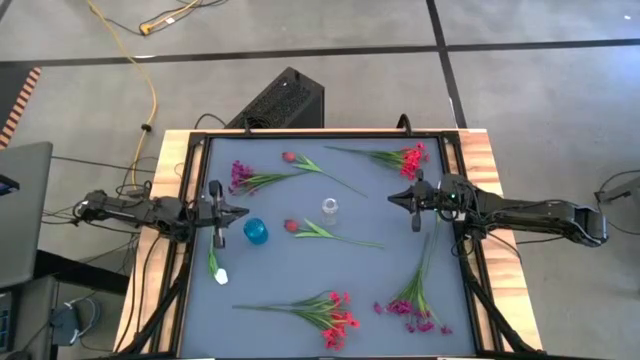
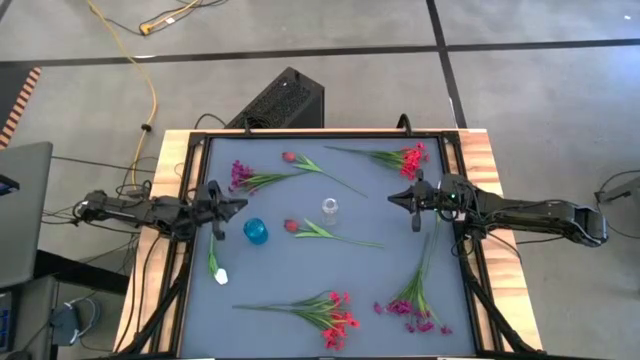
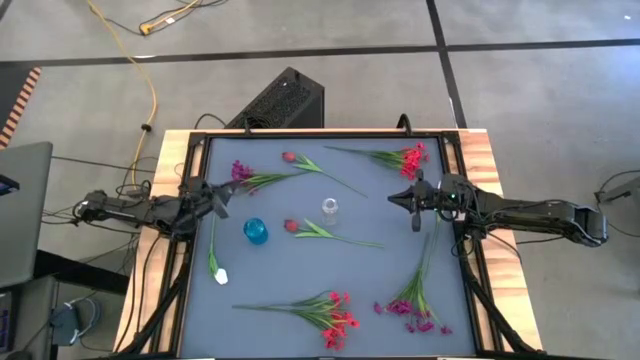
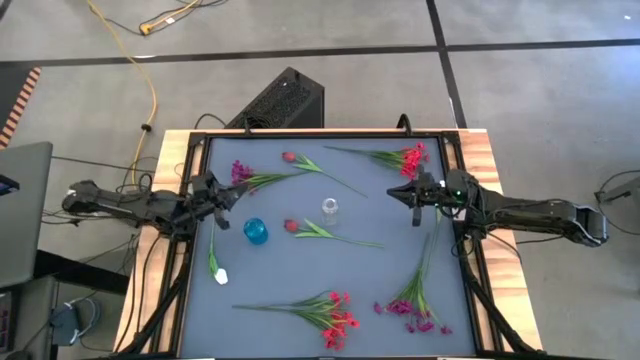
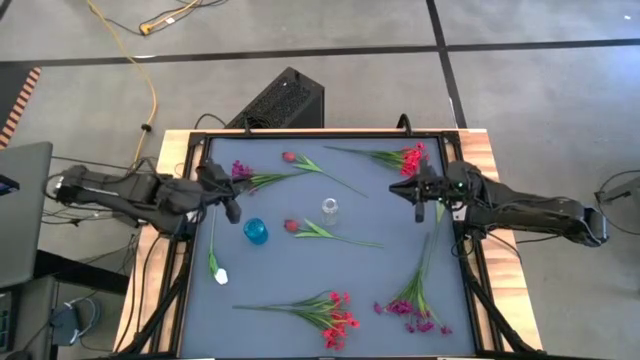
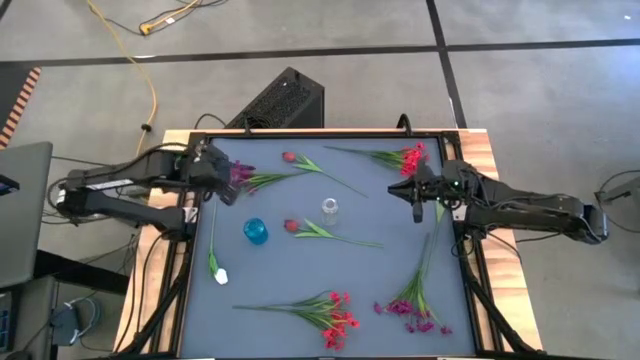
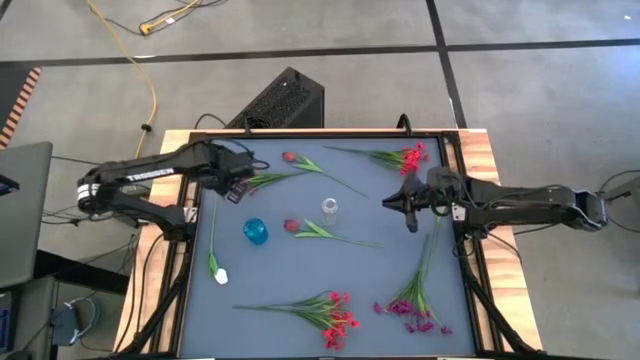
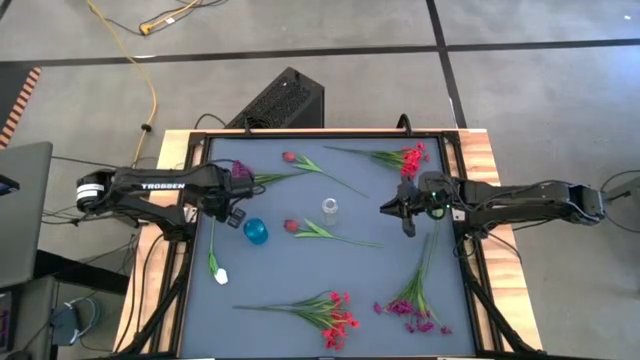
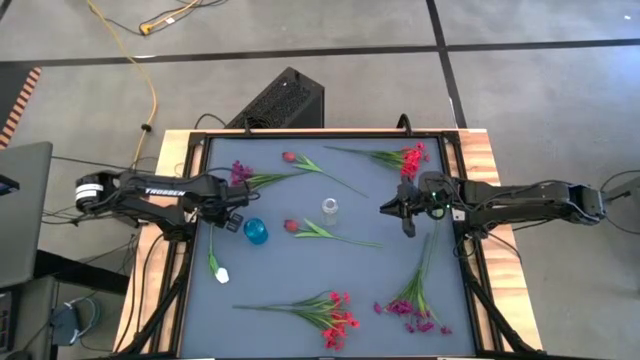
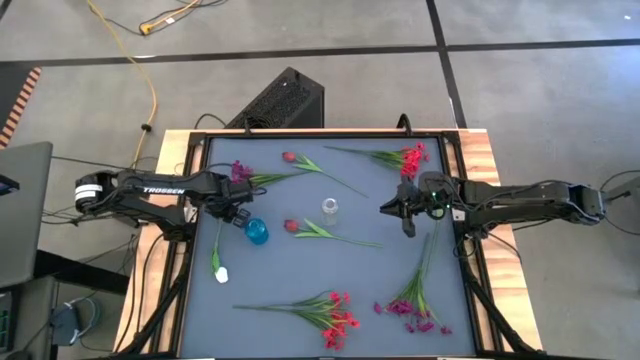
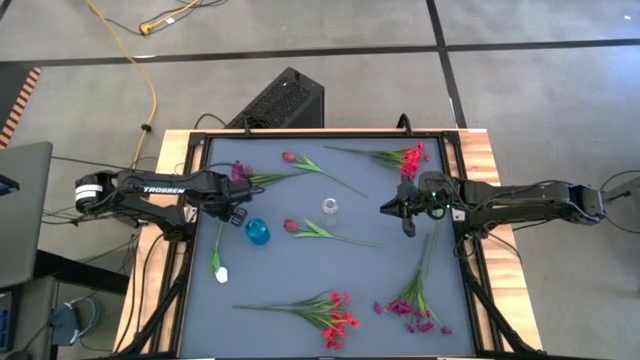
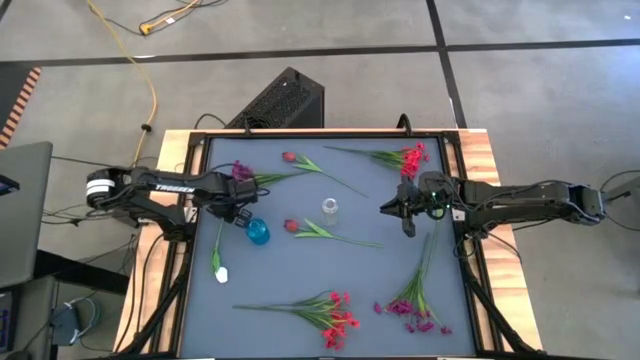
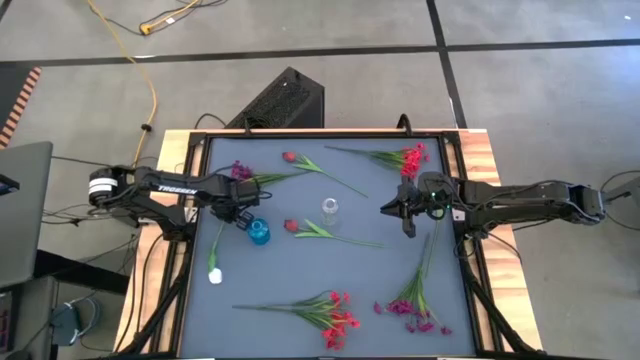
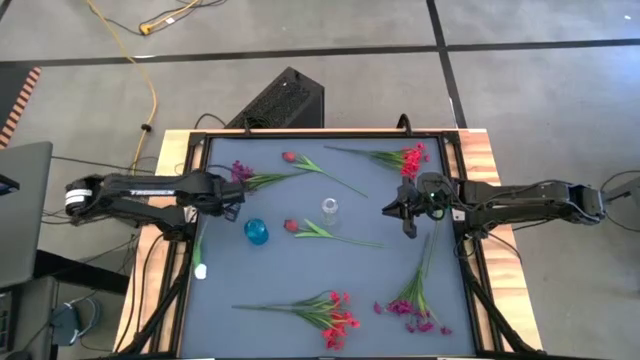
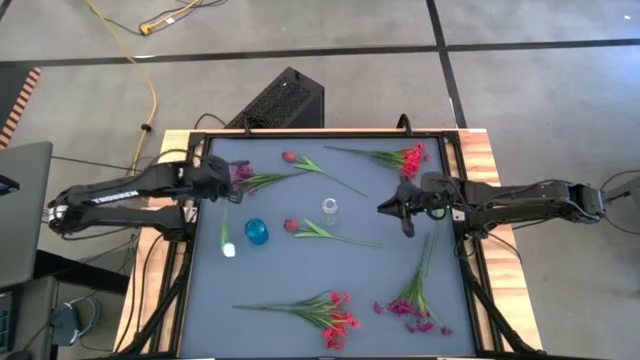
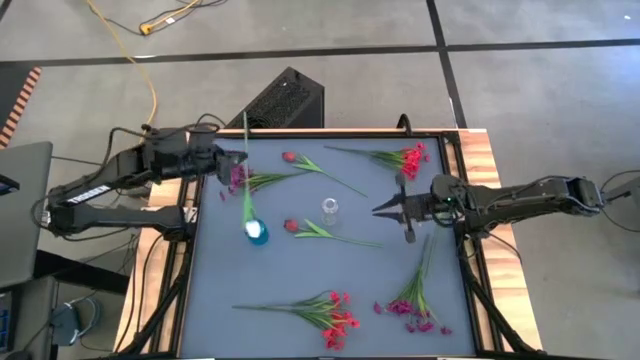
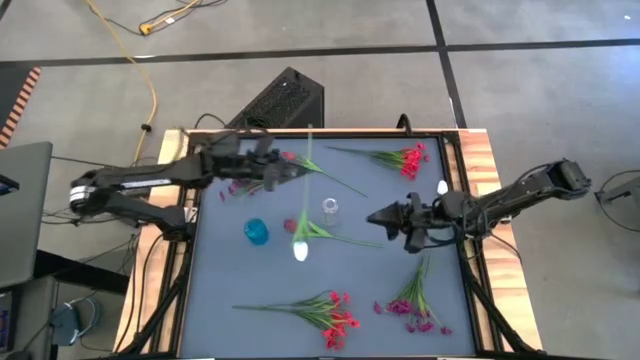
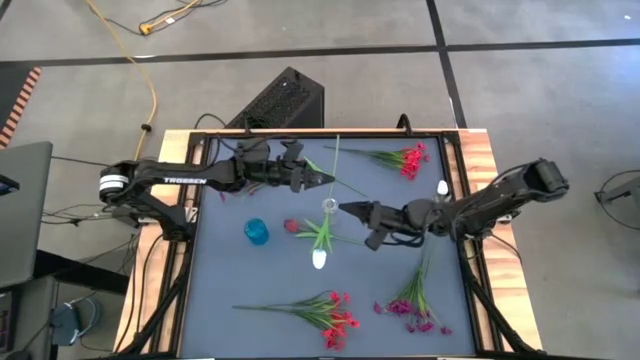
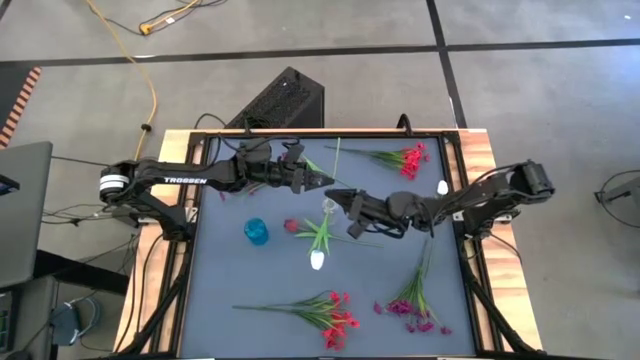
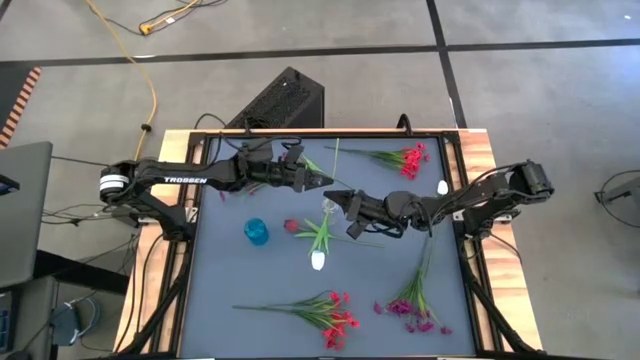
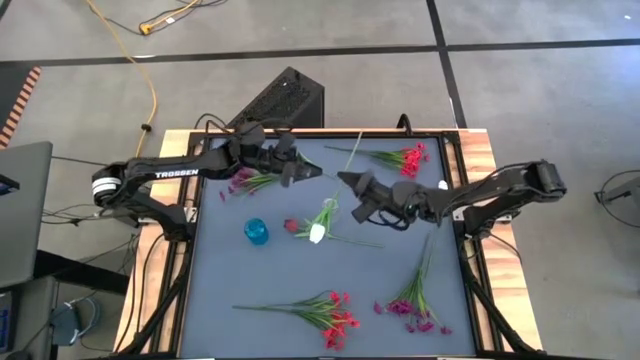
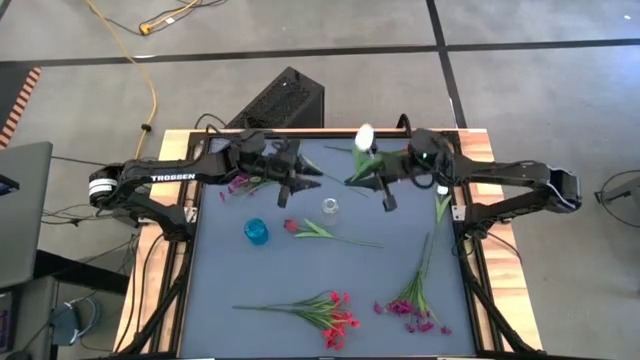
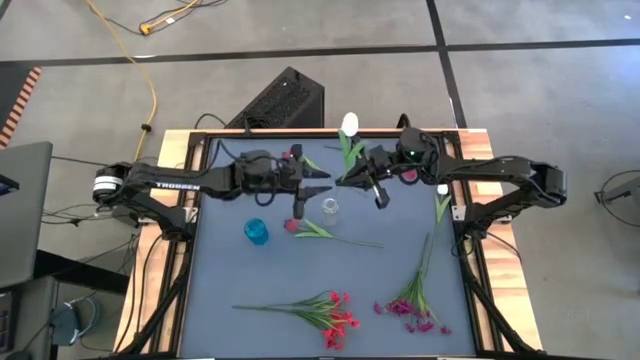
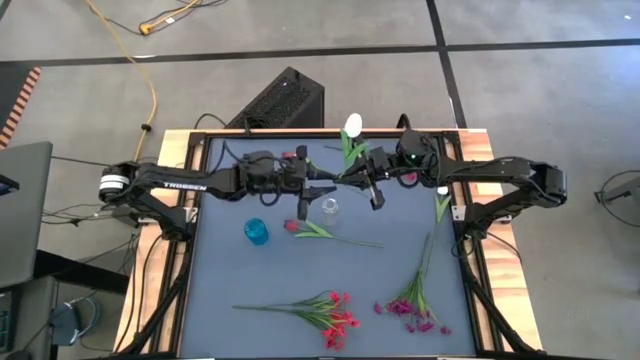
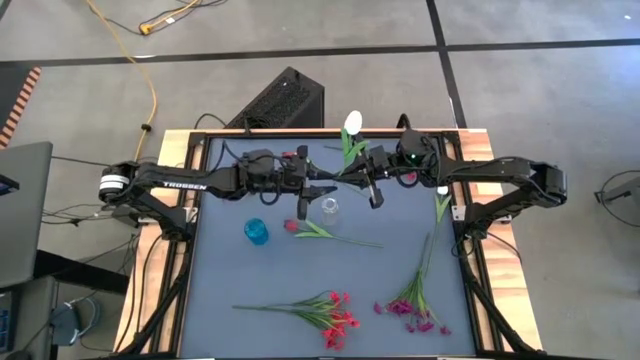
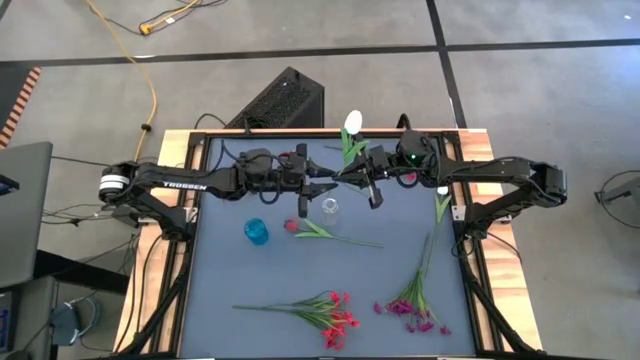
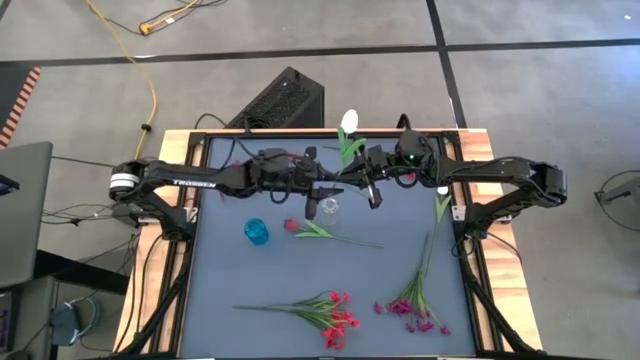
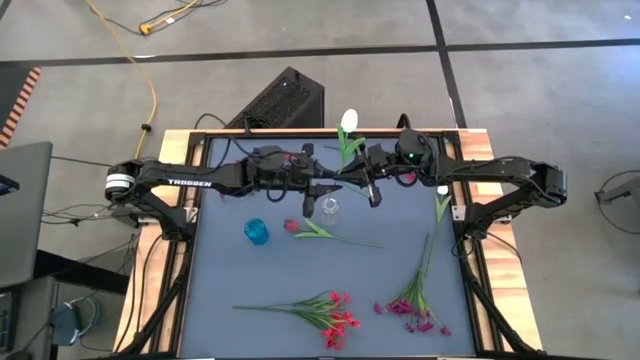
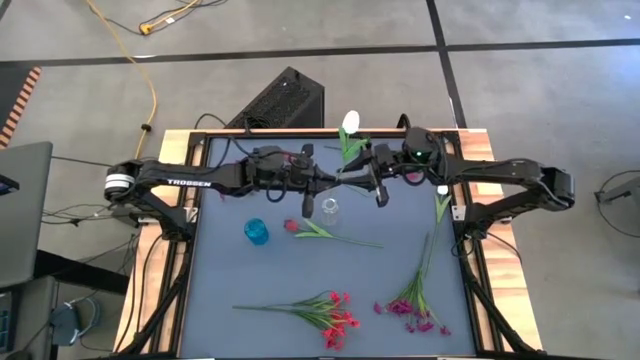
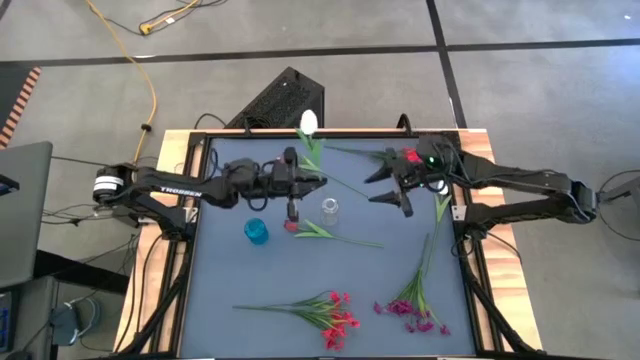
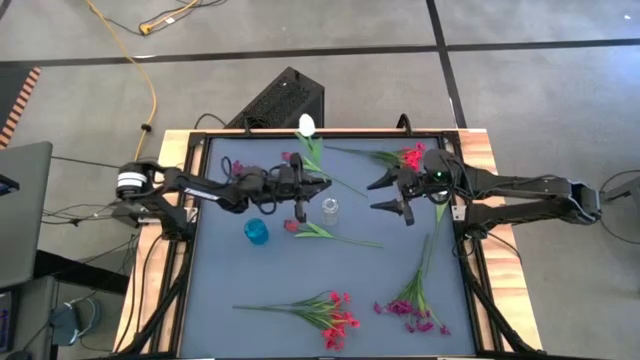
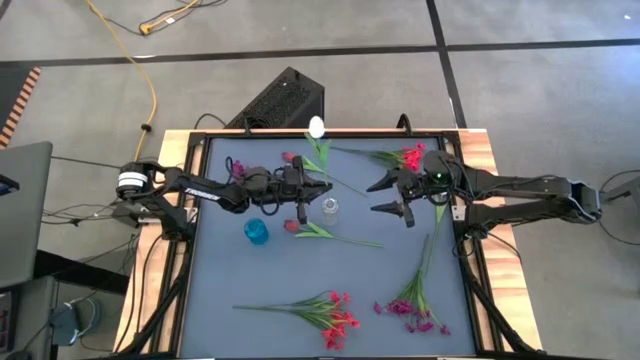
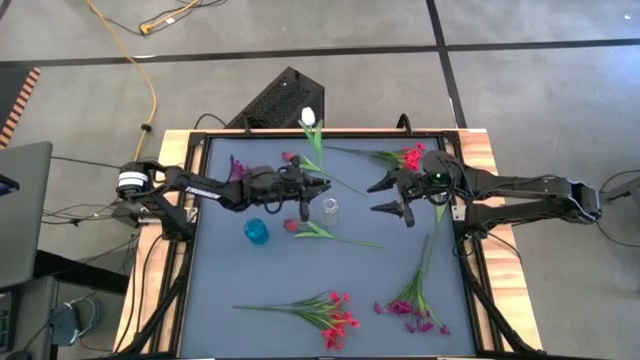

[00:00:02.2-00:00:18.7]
Task: Sort flowers into vase by color
Put the left white tulip into the transparent vase

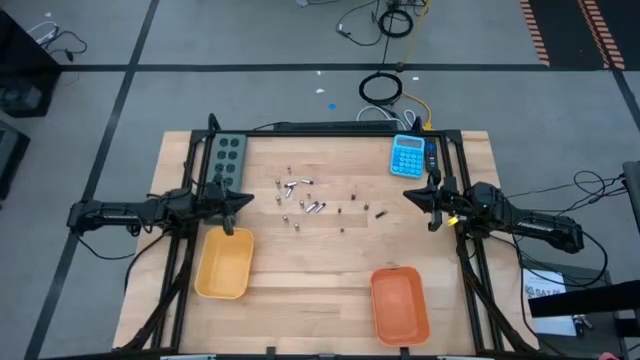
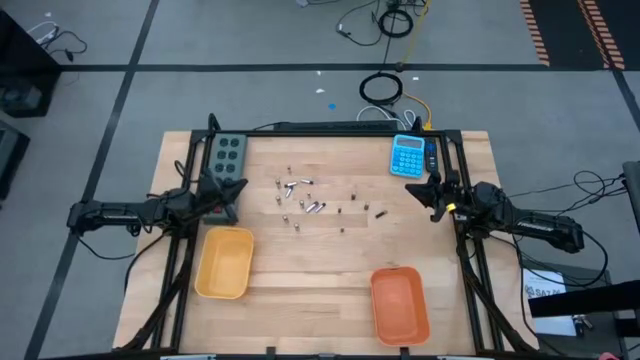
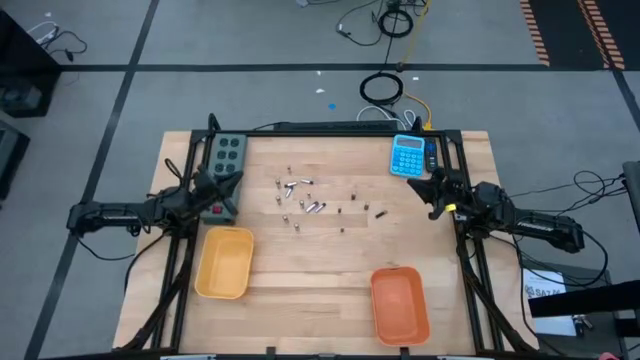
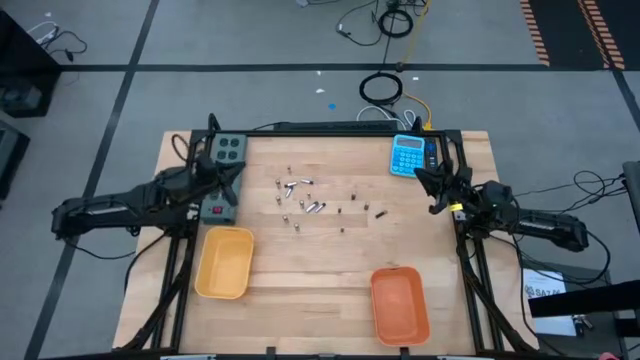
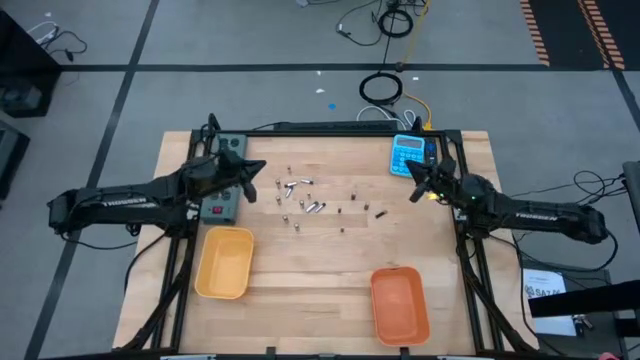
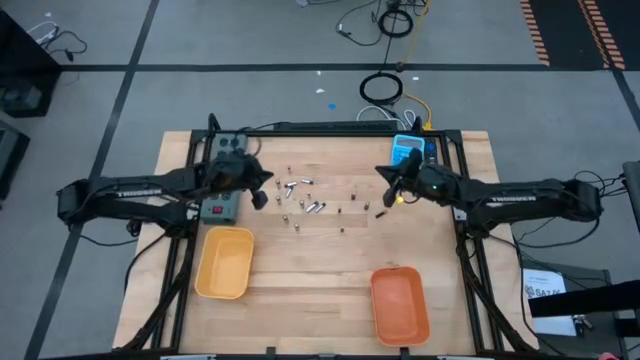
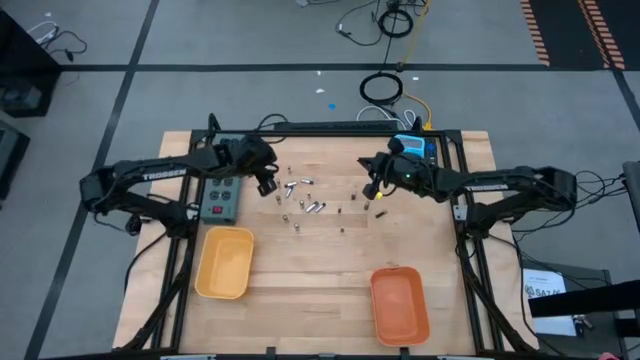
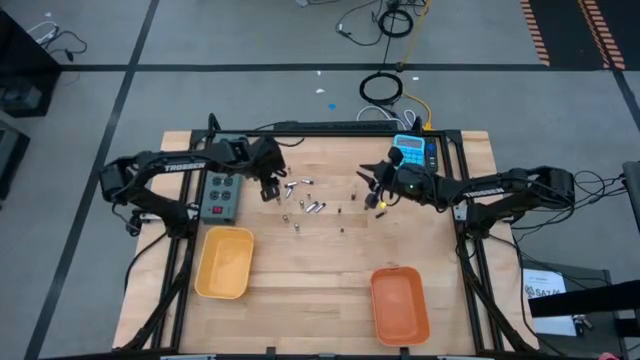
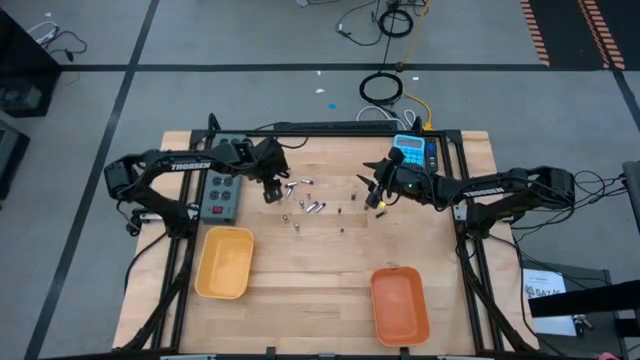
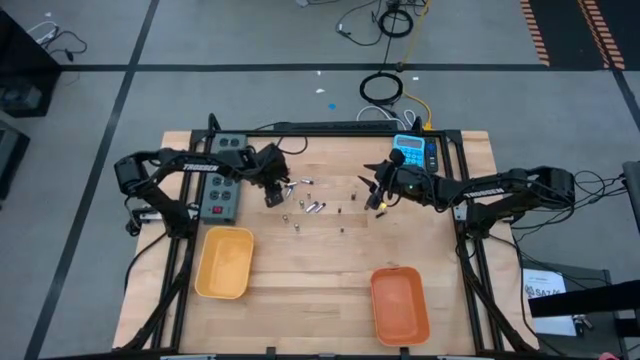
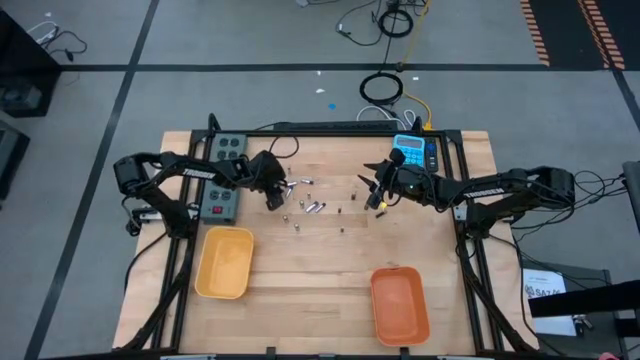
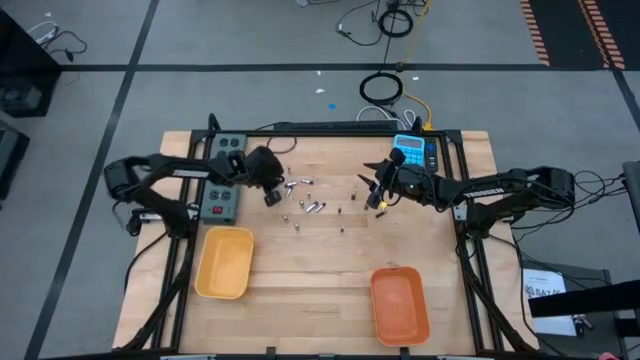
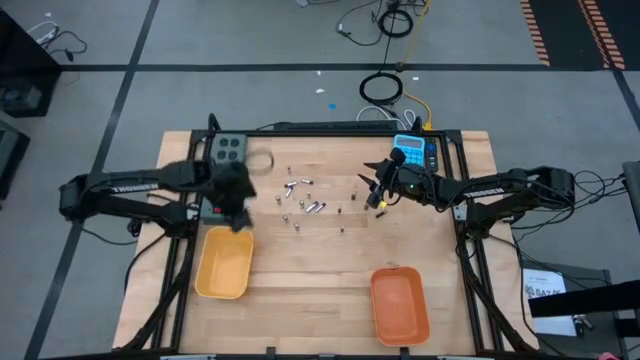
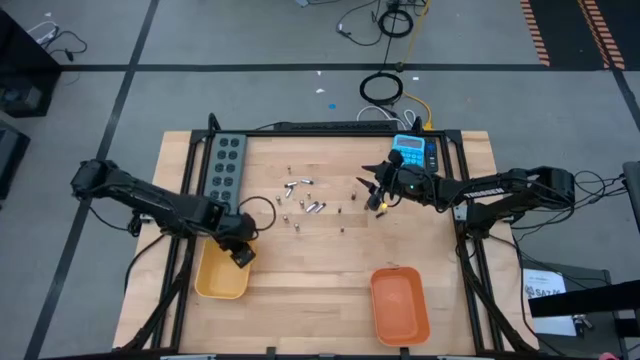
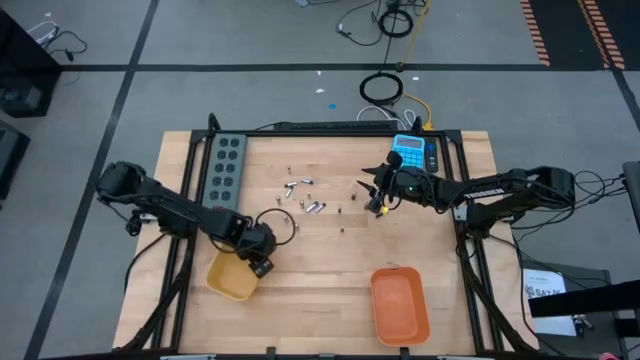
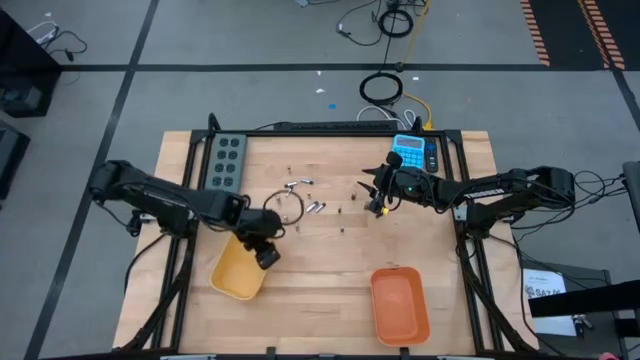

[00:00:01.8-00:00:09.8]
Task: Sort batteries
Put the silver battery into the yellow bin
